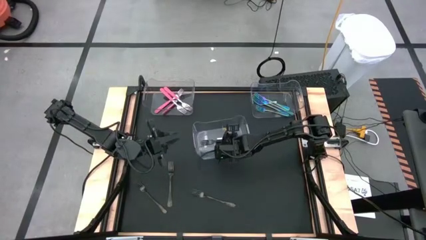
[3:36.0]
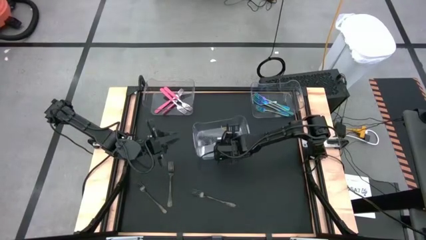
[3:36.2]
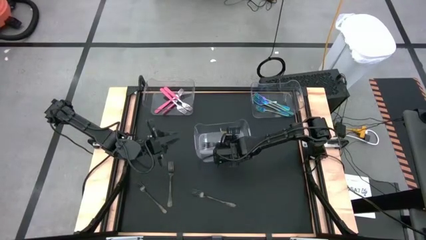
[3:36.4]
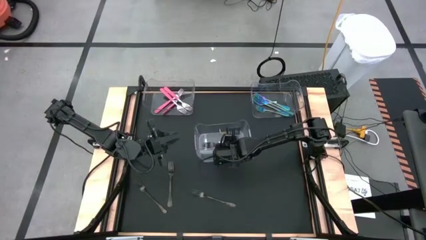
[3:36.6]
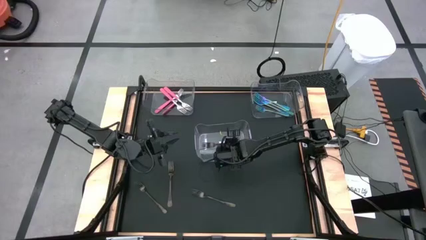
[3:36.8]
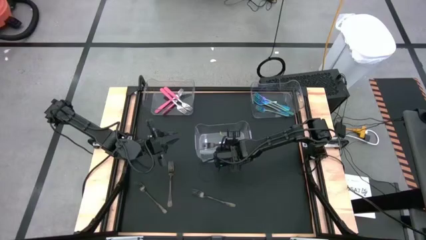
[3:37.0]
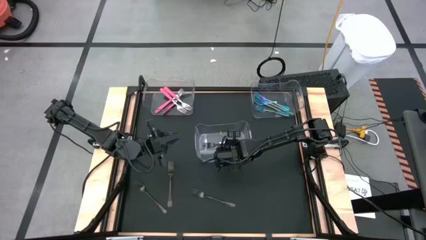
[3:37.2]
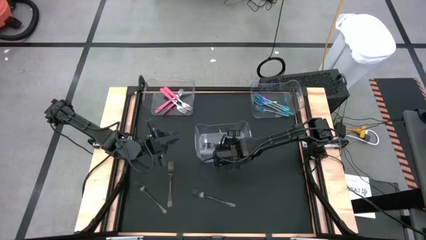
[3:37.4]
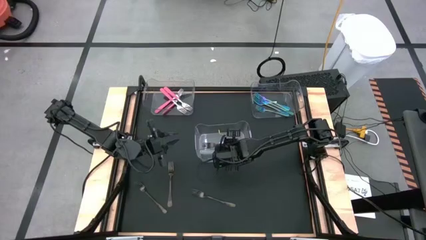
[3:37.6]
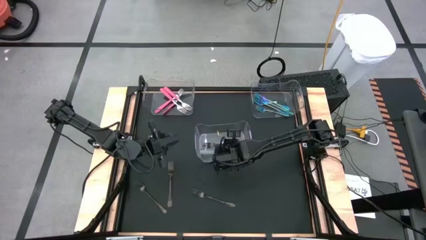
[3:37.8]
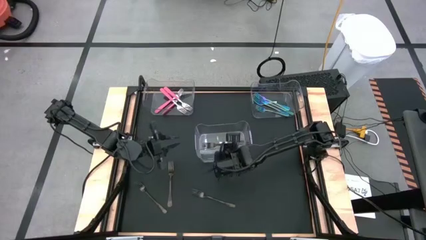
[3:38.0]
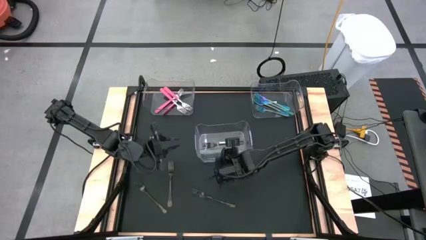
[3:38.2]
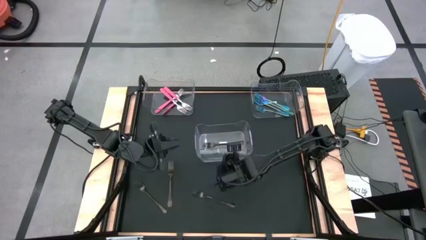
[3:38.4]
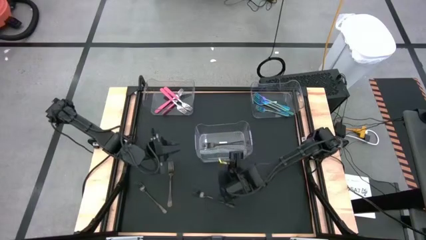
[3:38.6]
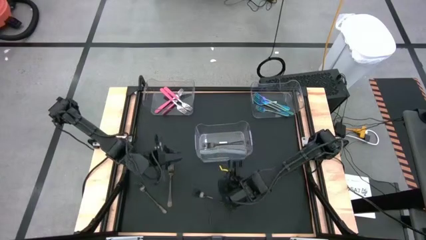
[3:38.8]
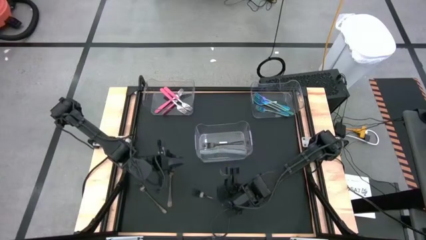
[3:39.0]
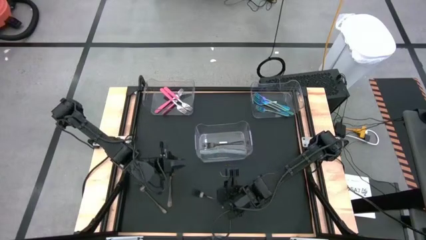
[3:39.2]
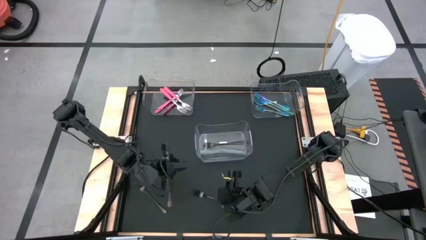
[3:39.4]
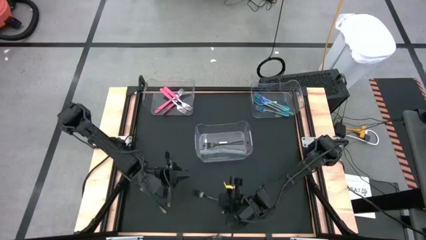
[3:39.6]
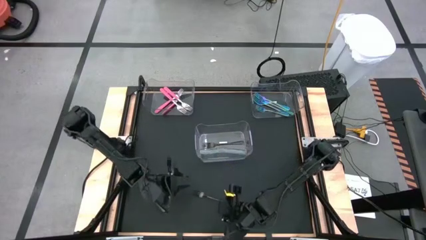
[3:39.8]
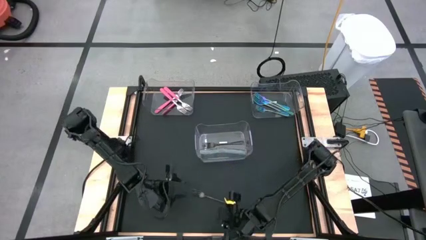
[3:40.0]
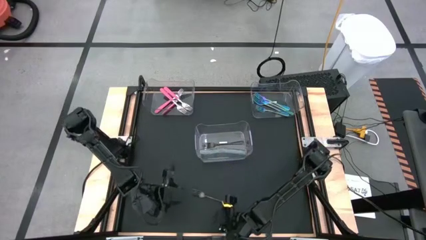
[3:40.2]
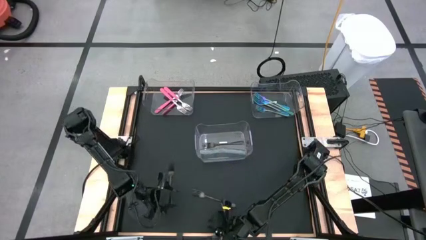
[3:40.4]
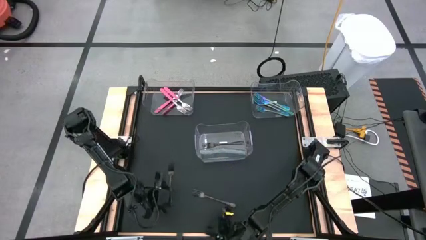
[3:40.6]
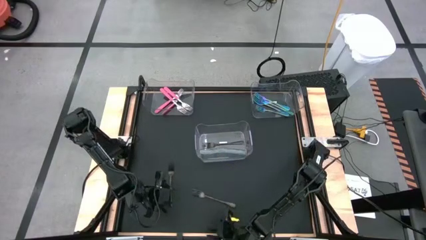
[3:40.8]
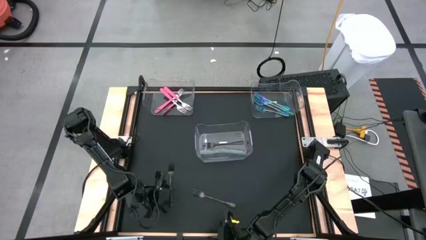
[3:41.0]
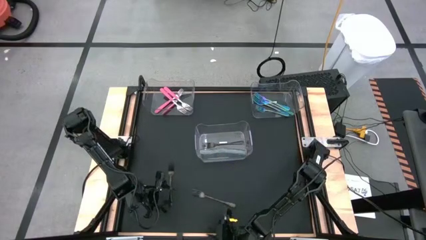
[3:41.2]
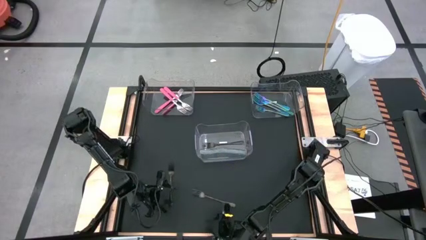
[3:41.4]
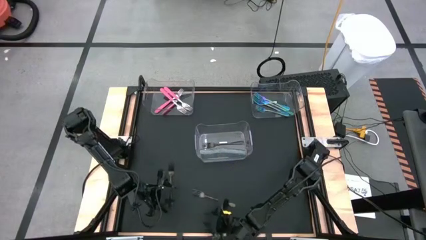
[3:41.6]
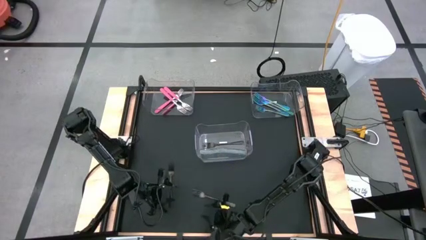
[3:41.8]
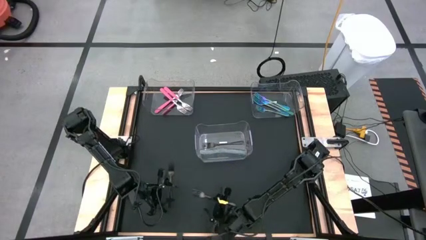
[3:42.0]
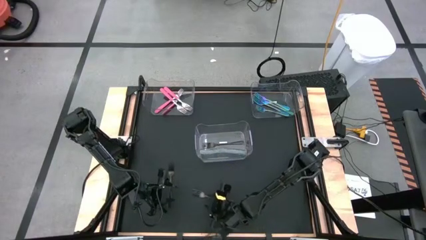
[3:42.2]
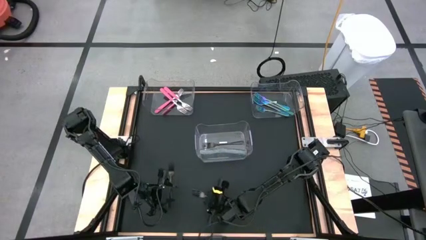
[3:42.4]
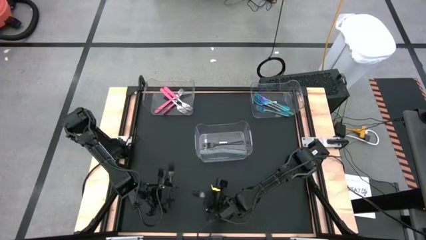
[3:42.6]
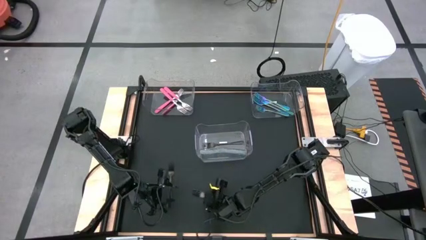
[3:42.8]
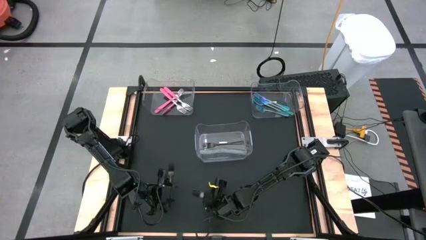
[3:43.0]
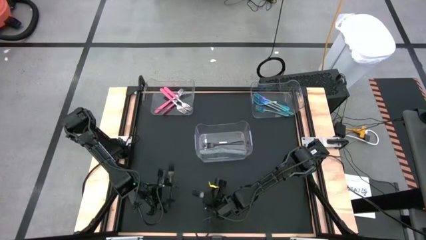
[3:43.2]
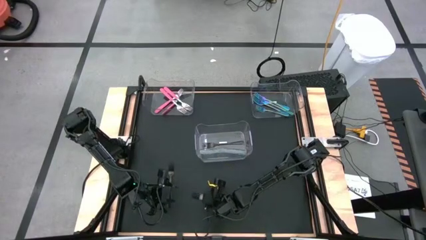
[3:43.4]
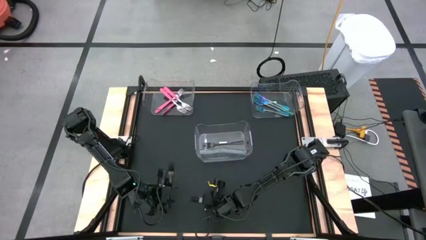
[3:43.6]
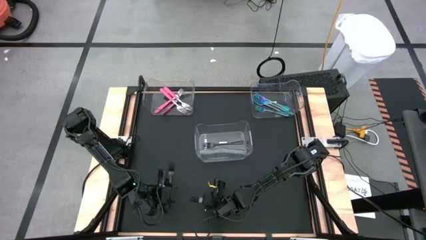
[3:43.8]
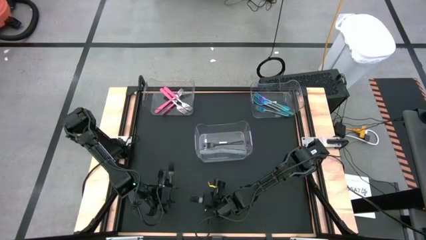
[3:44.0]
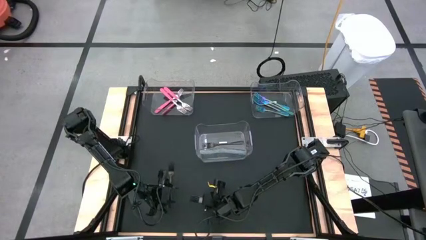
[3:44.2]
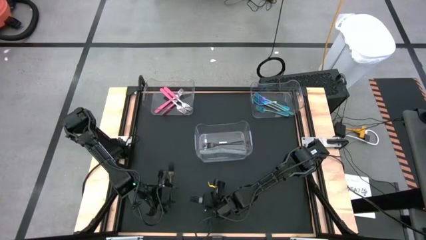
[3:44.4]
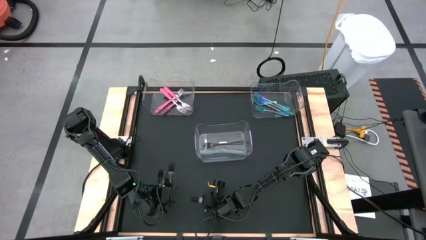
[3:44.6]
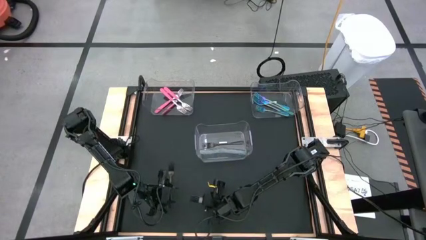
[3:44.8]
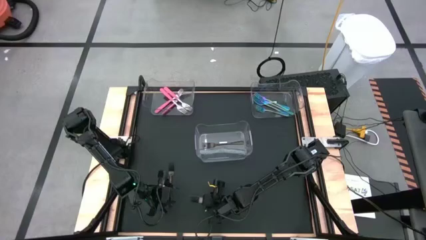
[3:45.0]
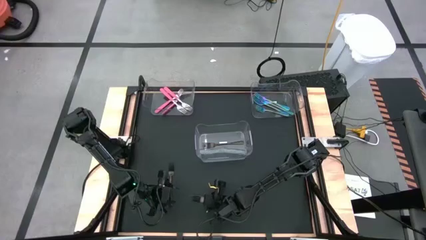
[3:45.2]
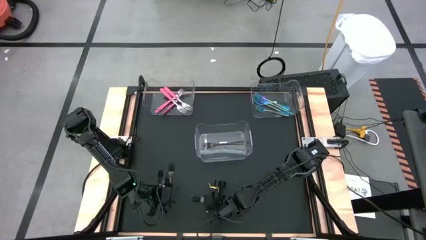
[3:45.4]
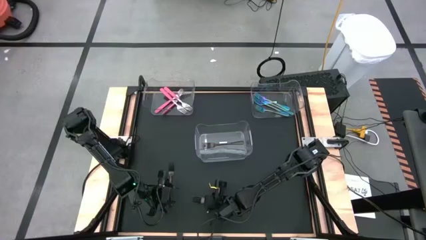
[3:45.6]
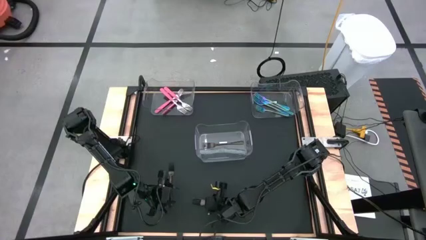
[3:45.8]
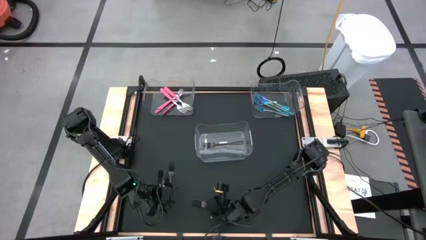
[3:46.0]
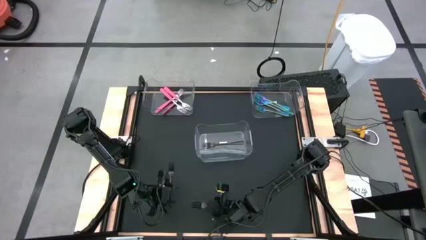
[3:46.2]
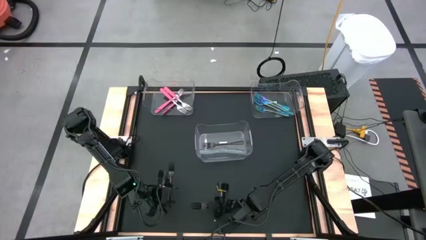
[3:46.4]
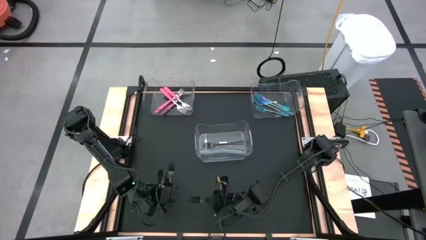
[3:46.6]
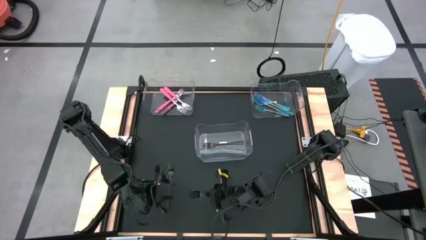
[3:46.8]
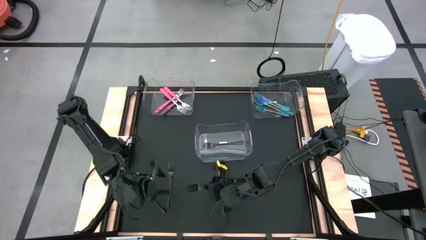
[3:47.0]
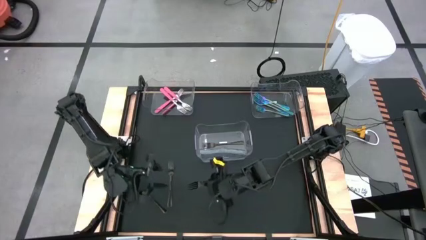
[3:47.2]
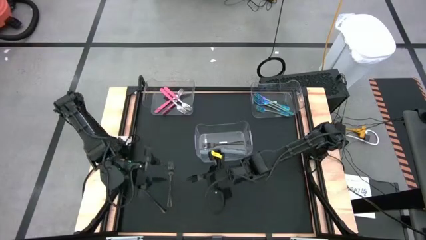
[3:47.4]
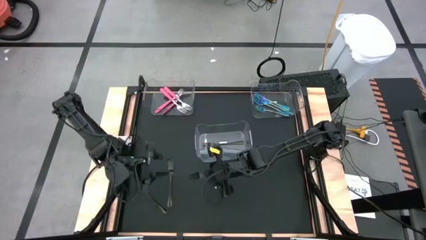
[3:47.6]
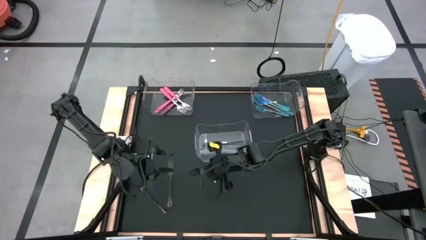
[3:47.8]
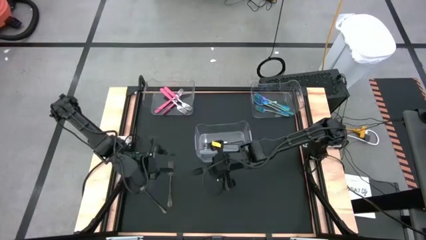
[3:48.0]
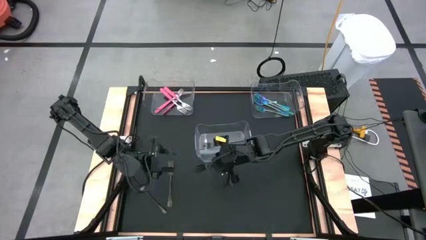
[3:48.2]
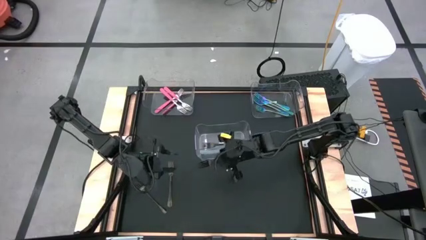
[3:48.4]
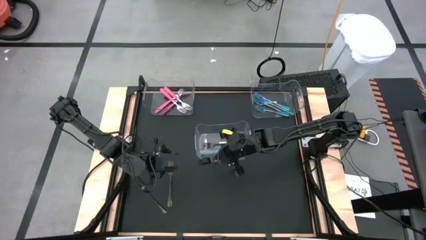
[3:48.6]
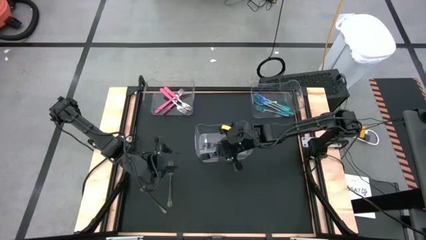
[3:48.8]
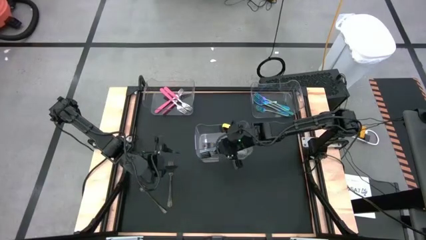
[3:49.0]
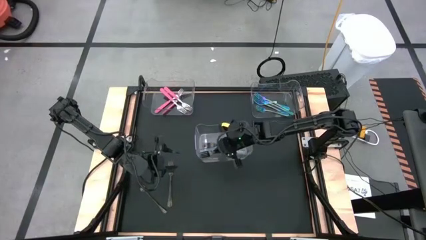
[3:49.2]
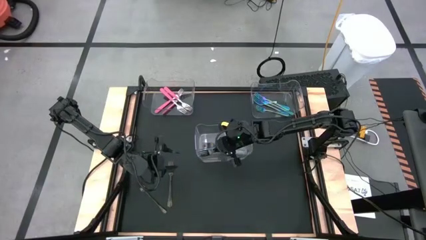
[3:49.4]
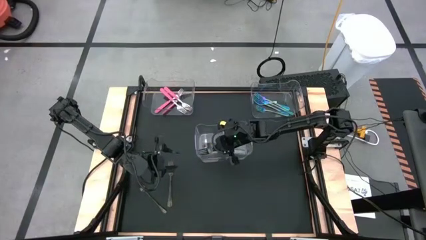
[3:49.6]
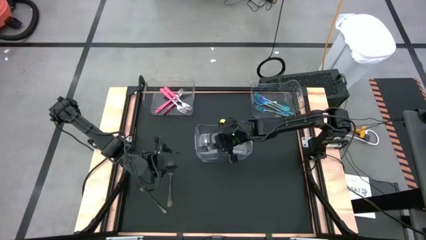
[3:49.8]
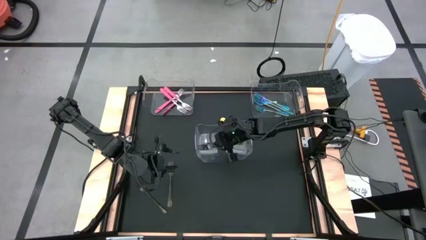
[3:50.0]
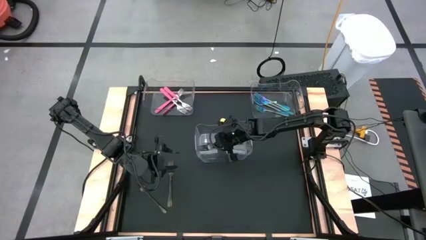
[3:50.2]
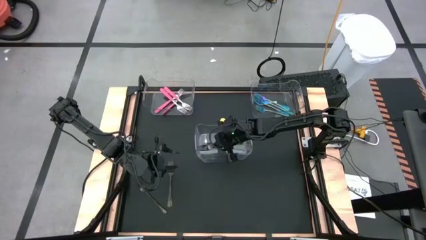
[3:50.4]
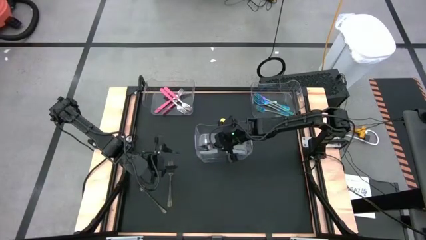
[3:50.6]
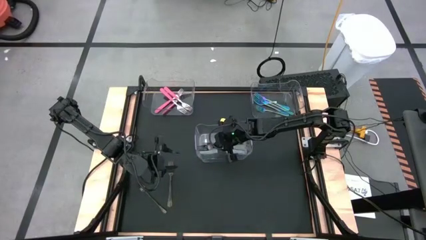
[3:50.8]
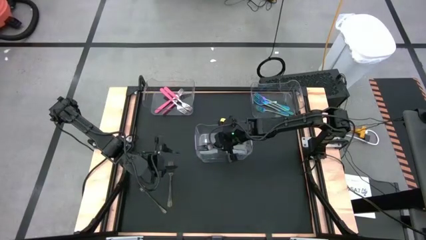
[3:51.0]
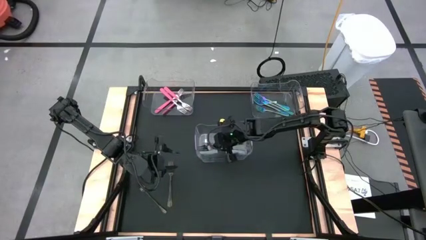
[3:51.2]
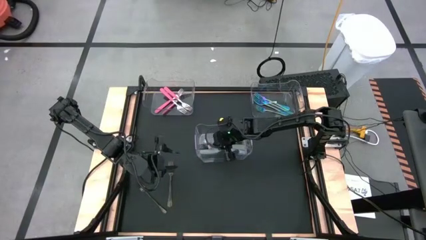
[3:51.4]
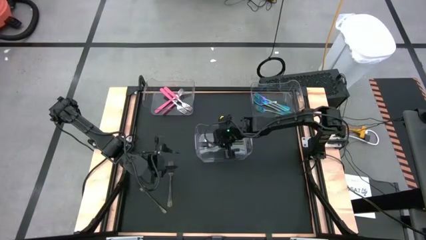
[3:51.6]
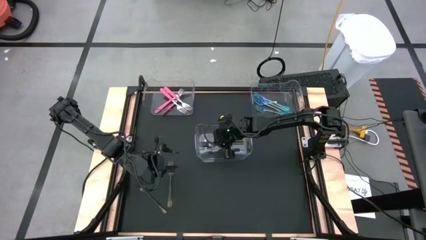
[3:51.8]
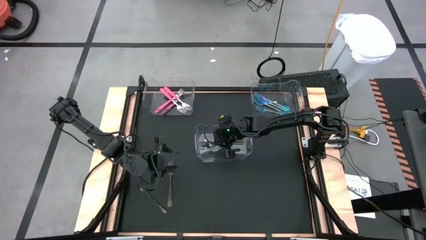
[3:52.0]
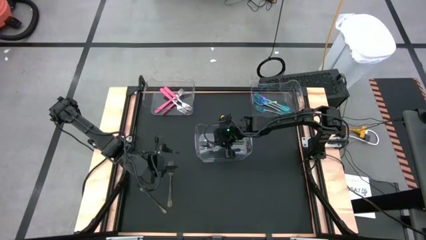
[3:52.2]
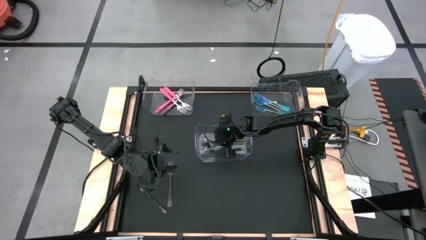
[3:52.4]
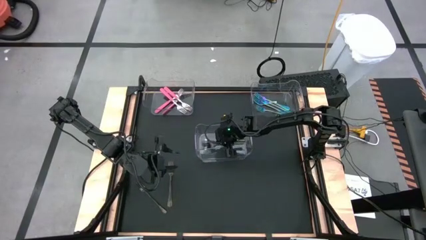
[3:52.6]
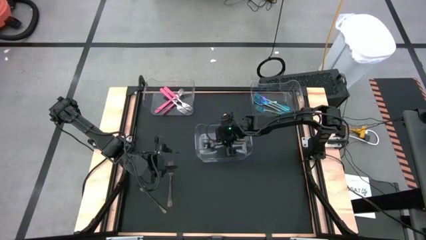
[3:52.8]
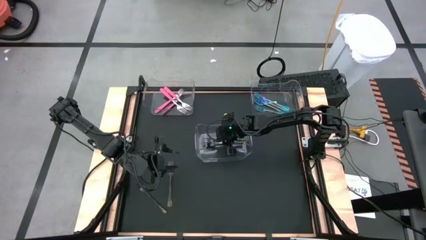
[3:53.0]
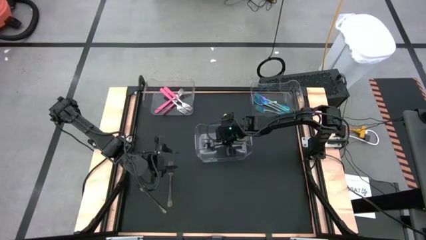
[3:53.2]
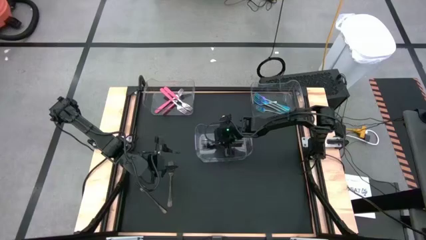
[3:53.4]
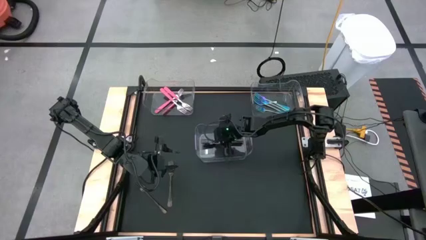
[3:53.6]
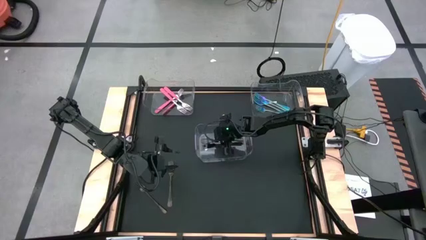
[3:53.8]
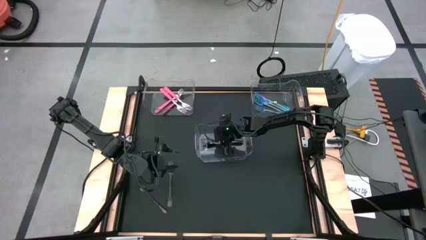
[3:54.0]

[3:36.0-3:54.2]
Task: Sort silverware by color (type)
Put the silver fork into the middle transparent bin
